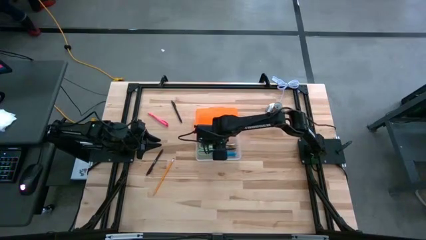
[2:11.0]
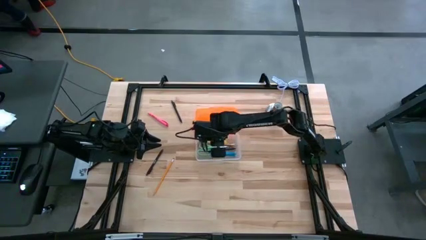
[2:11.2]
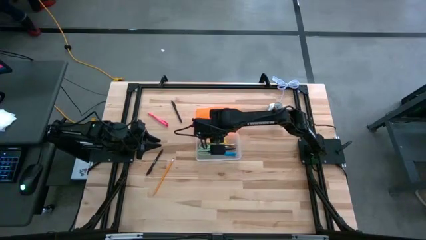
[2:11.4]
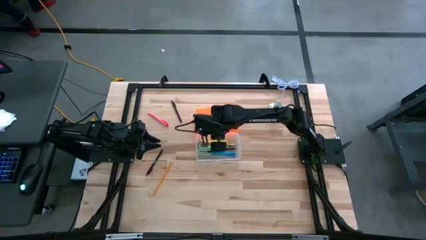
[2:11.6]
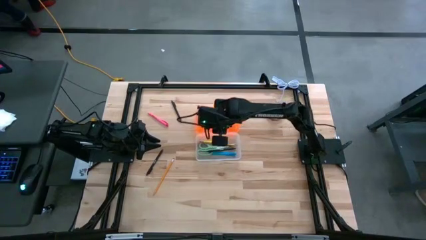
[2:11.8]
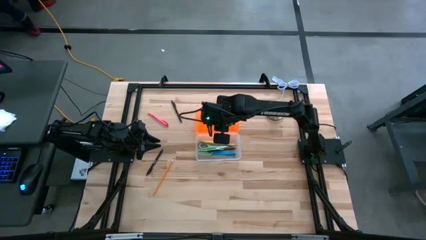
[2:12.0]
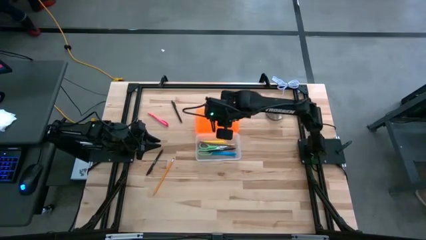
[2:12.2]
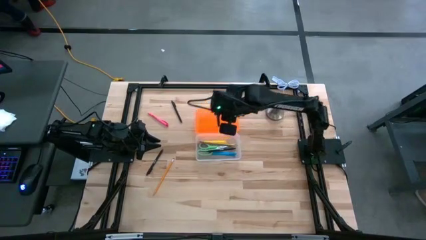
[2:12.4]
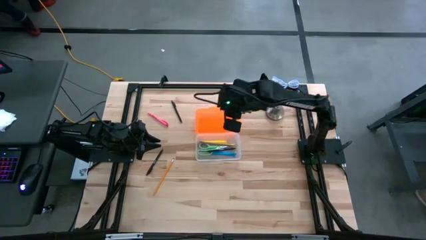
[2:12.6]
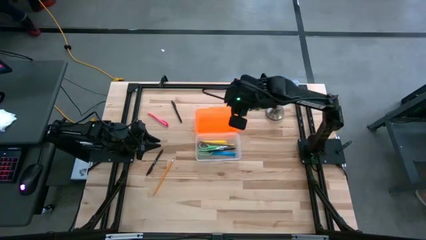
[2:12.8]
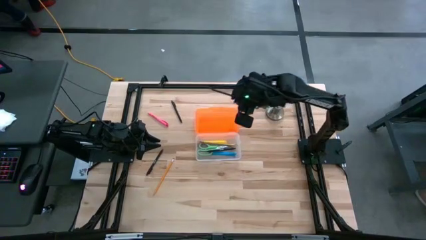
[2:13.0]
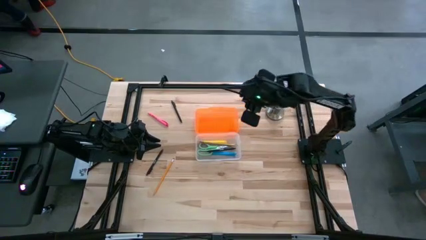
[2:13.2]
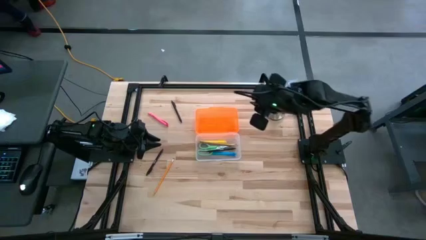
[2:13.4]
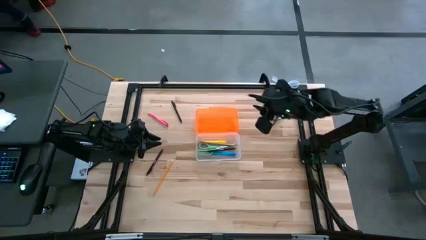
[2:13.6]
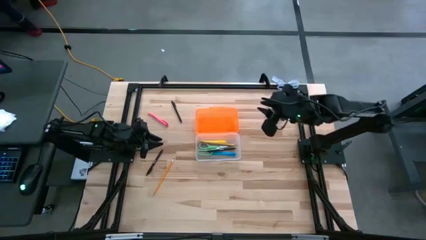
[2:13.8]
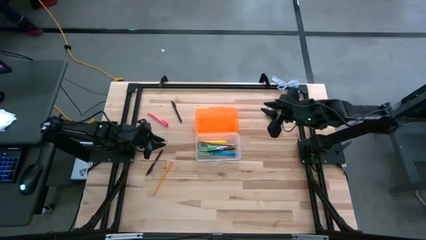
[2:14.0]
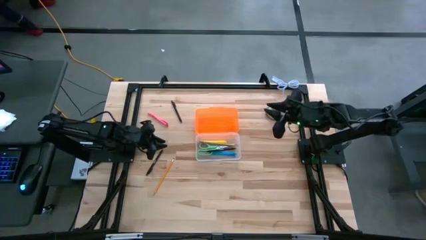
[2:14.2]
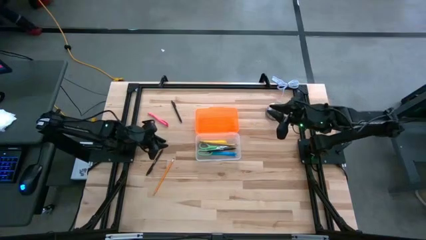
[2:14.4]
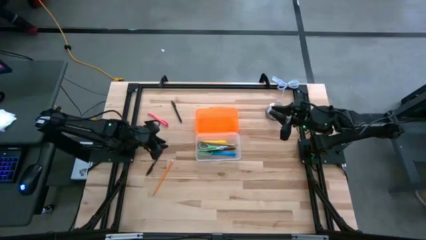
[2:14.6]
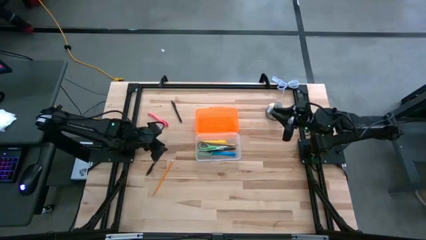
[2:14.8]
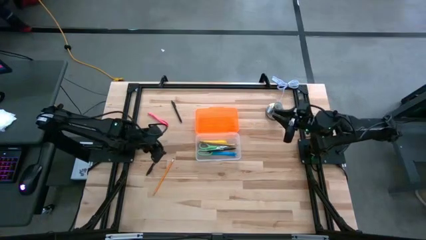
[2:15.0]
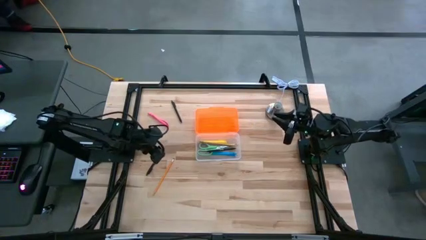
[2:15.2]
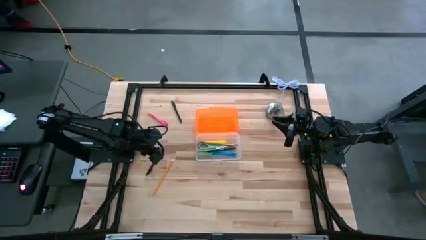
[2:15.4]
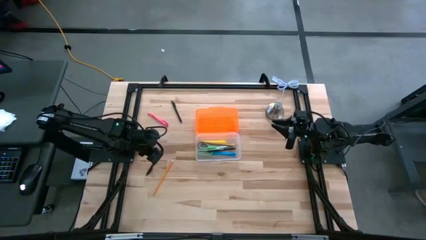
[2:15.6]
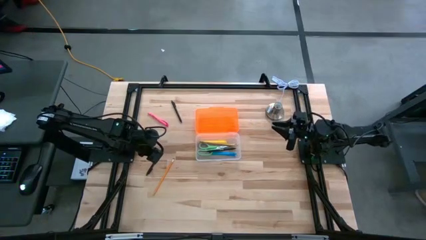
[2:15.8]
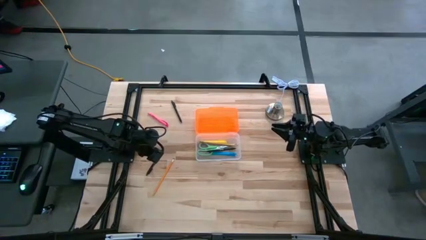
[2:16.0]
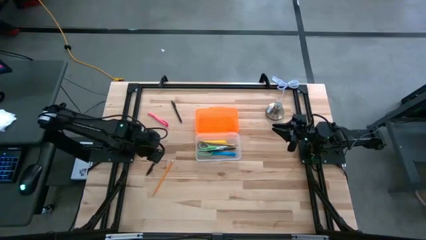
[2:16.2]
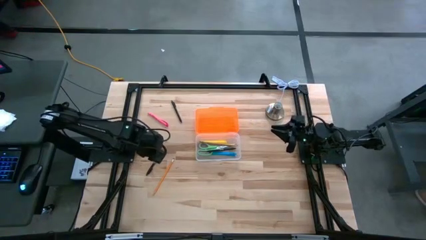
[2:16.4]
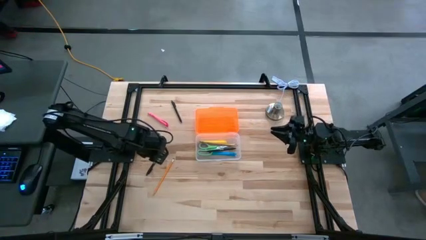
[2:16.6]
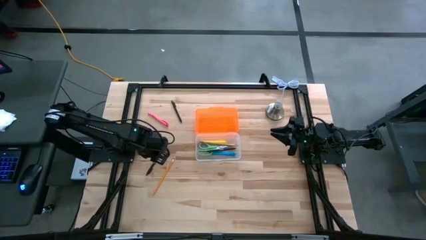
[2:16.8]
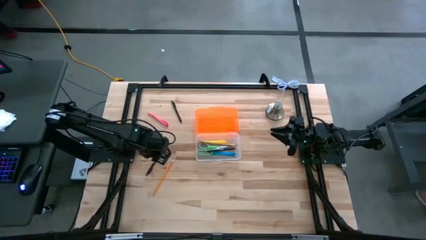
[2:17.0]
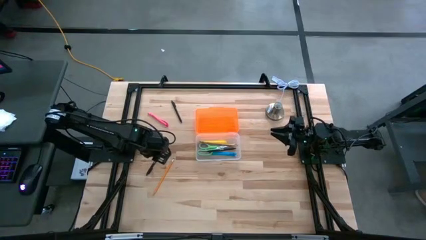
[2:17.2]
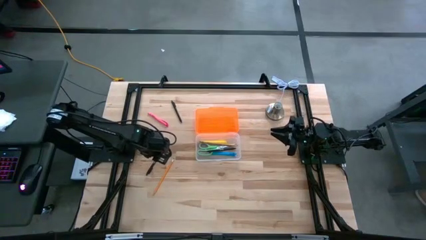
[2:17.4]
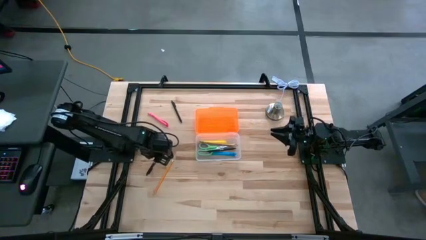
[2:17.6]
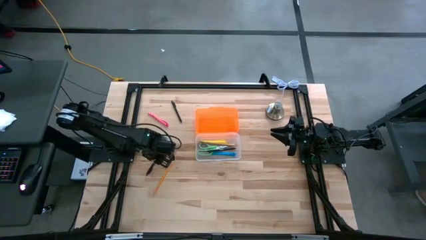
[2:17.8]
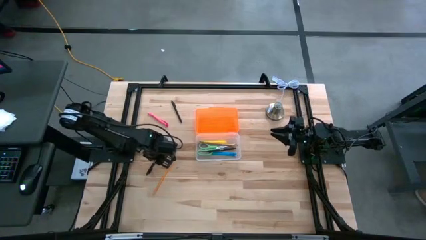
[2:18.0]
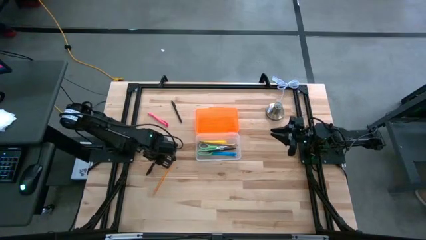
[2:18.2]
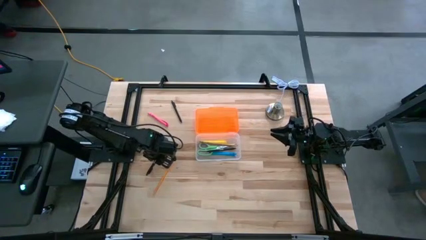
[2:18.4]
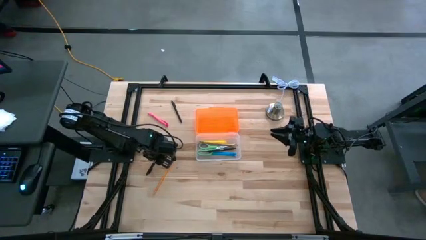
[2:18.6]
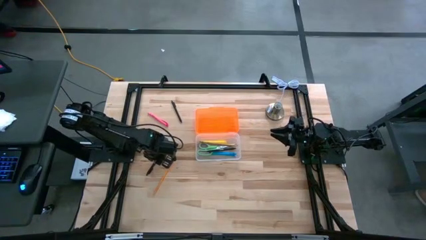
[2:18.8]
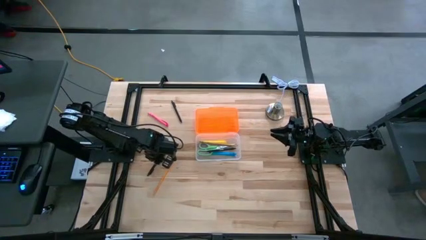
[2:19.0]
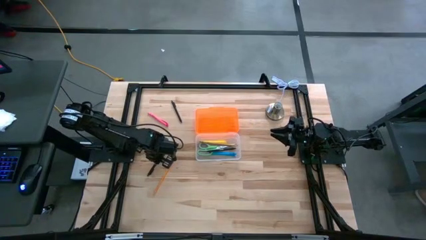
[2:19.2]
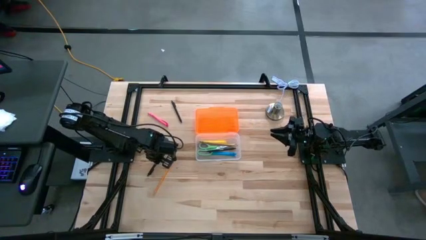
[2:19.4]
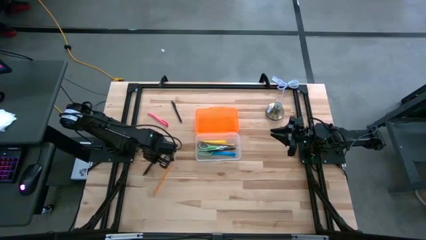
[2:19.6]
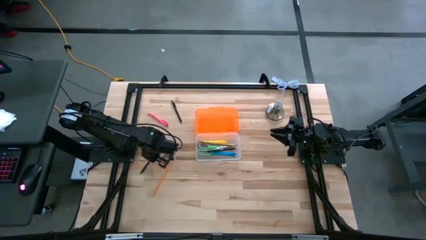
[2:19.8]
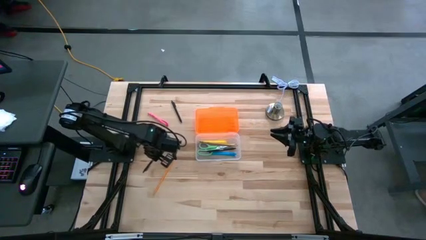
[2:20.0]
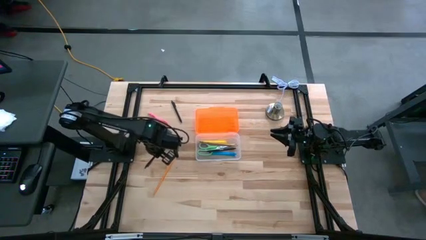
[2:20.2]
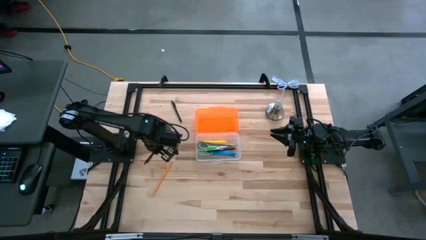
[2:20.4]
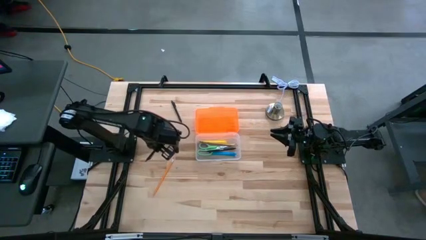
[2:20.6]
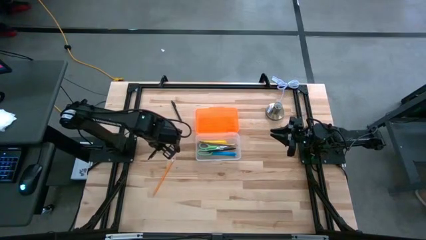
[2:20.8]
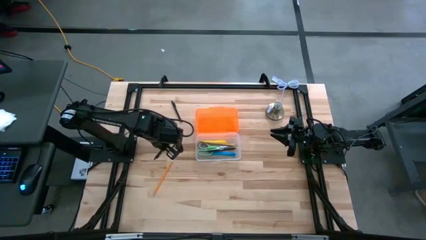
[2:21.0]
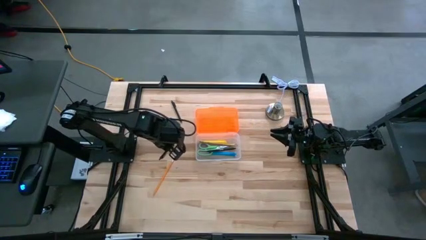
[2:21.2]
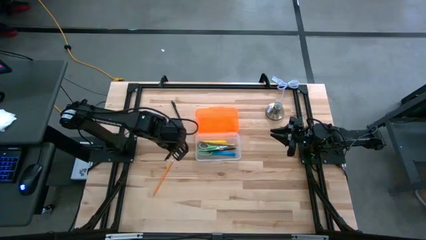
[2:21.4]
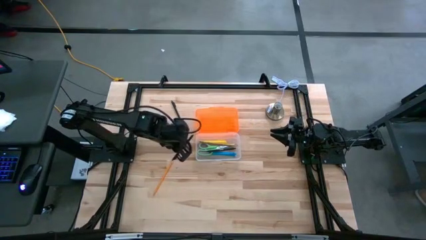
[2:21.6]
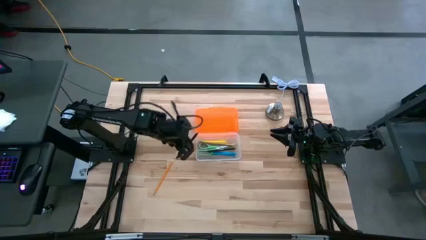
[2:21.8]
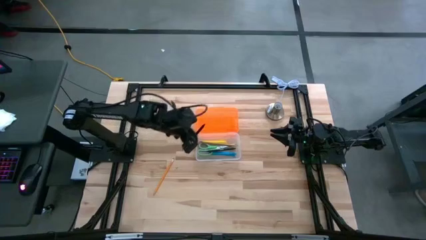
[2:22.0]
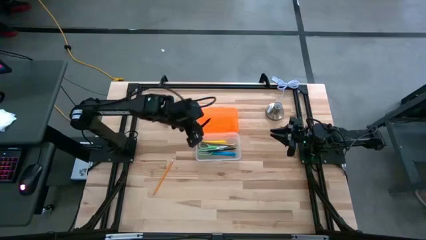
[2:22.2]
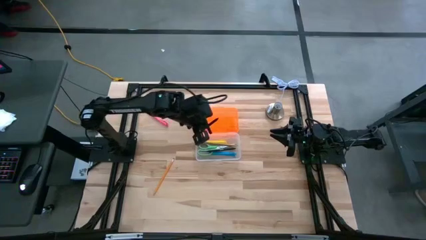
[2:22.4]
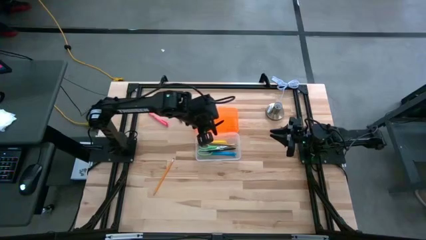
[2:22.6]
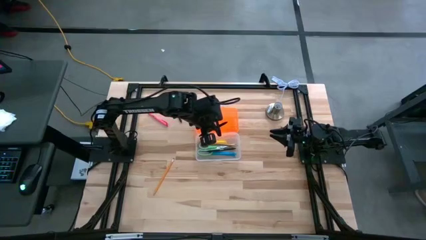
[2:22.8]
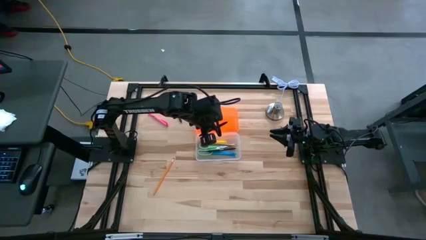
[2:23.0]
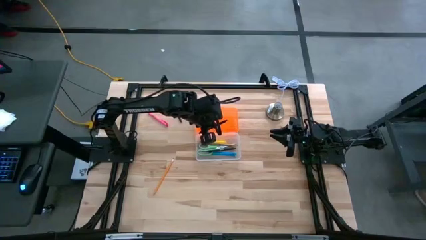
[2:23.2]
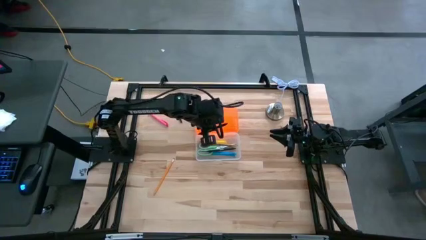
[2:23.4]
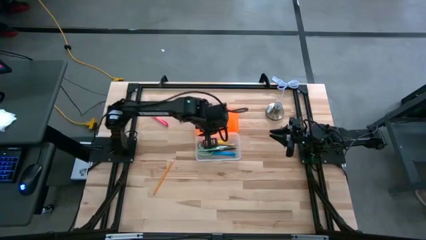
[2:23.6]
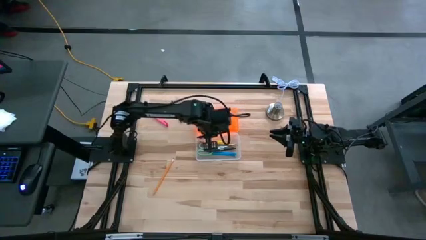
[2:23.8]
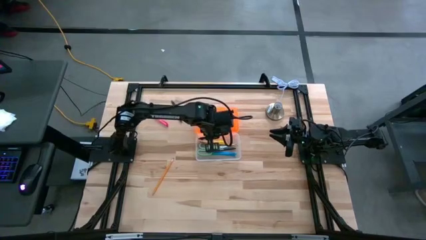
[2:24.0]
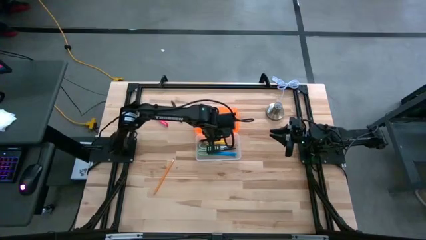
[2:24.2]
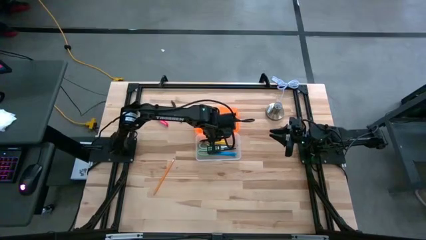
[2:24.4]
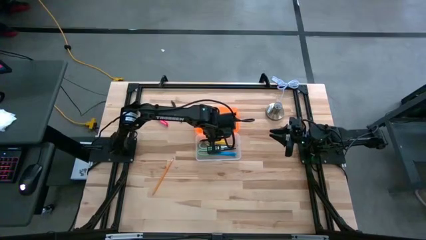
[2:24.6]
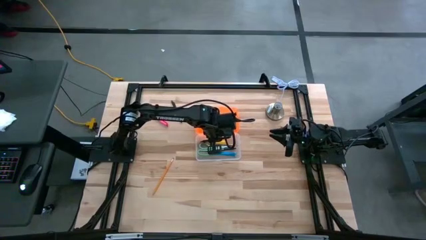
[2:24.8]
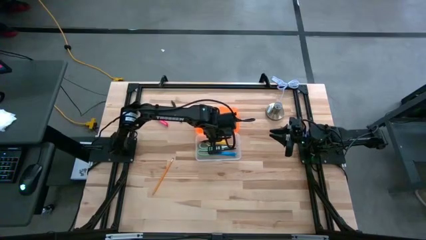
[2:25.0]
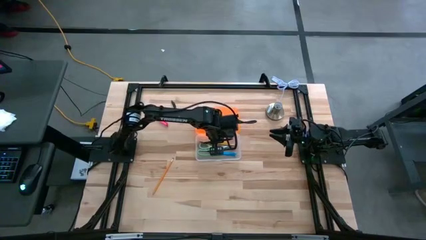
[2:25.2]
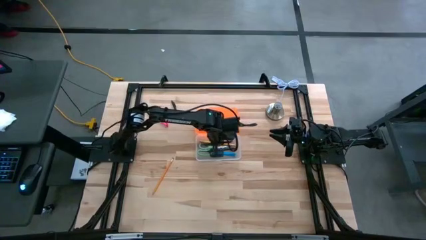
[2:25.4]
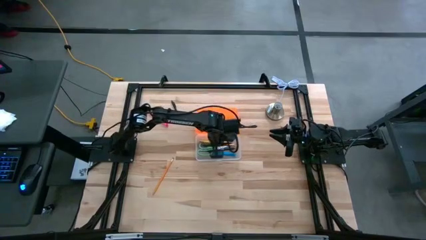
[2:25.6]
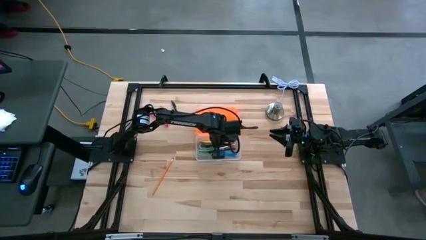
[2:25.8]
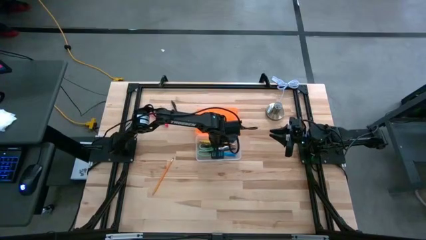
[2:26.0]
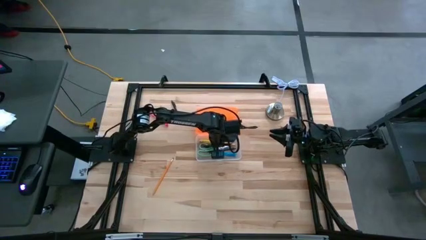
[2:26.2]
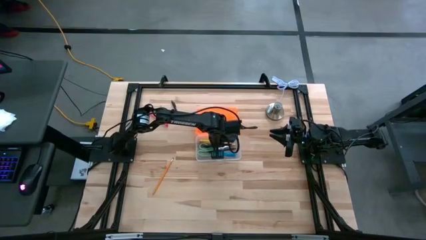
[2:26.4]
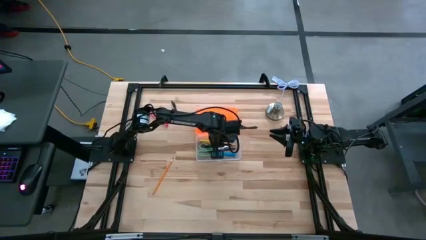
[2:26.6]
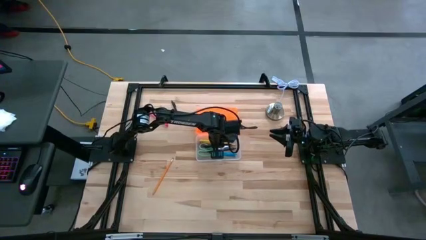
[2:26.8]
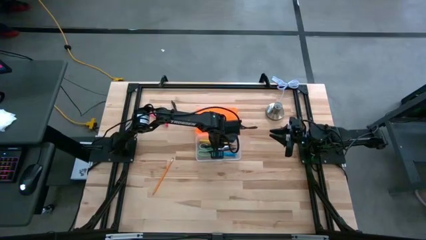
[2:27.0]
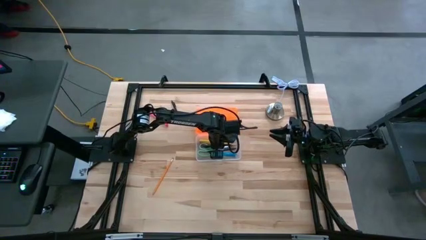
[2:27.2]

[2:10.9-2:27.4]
Task: Pick & place school supplies into a supply box
Put the bottom black pen into the orange supply box
